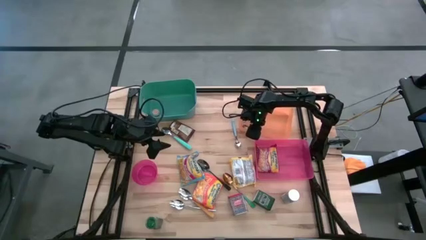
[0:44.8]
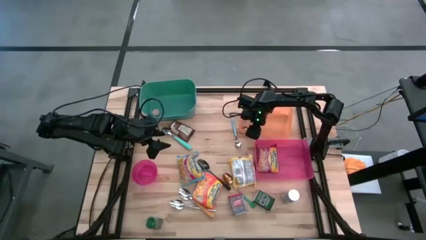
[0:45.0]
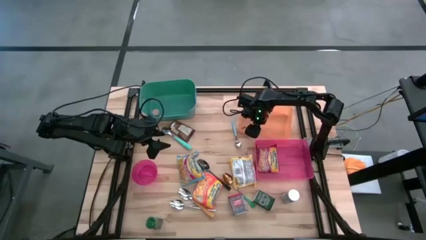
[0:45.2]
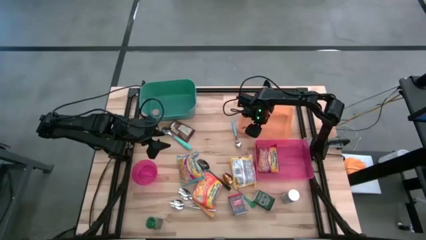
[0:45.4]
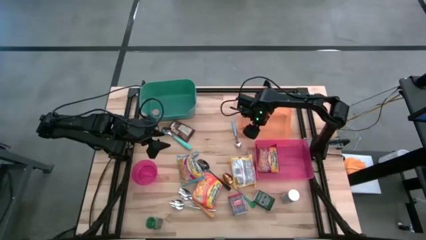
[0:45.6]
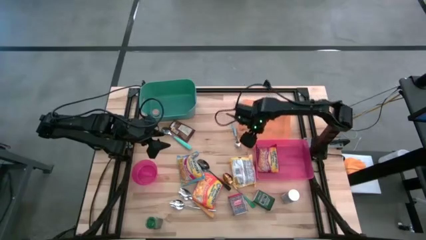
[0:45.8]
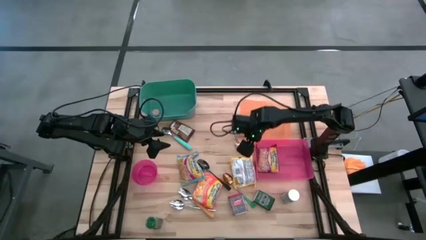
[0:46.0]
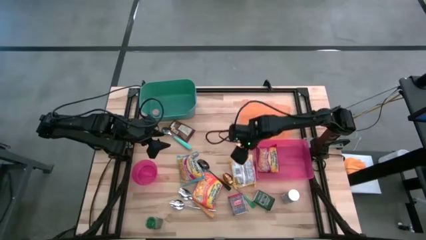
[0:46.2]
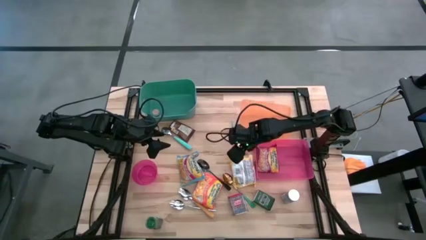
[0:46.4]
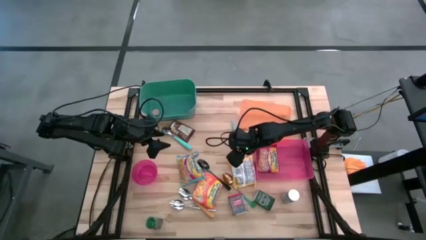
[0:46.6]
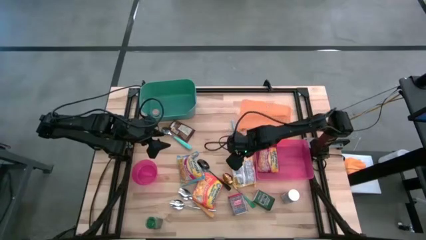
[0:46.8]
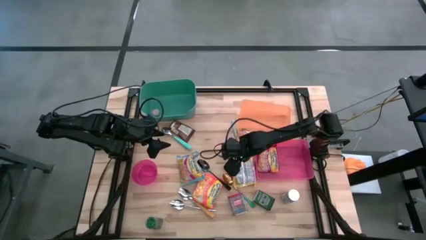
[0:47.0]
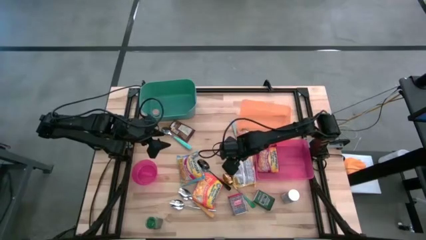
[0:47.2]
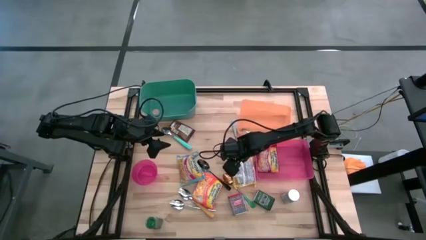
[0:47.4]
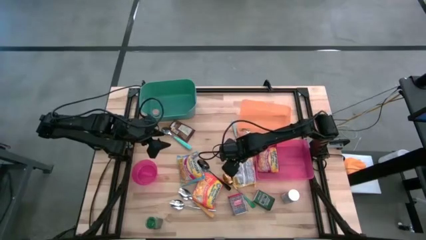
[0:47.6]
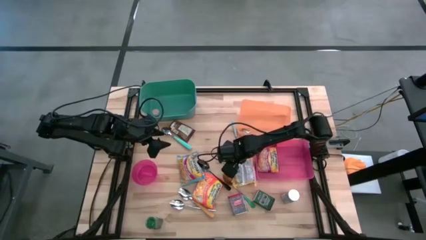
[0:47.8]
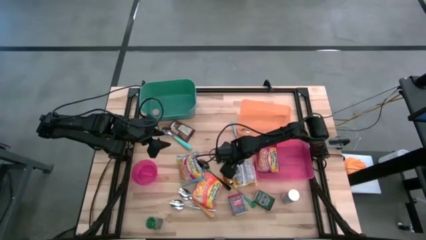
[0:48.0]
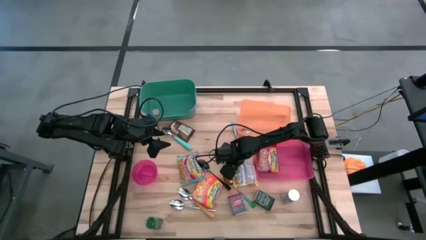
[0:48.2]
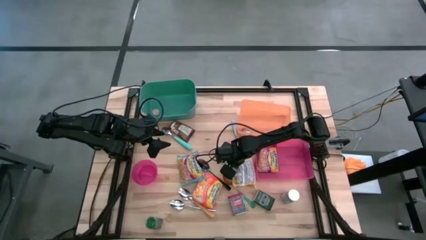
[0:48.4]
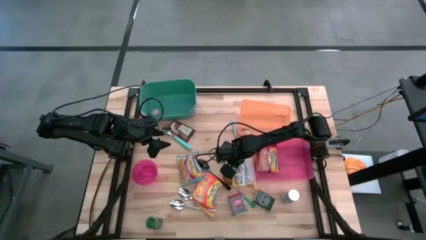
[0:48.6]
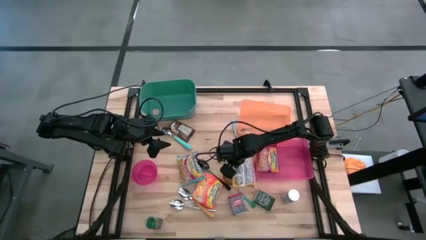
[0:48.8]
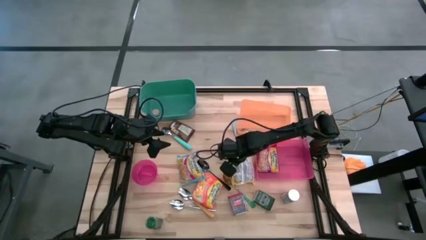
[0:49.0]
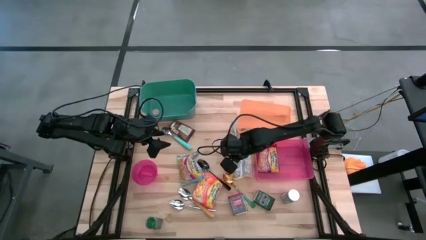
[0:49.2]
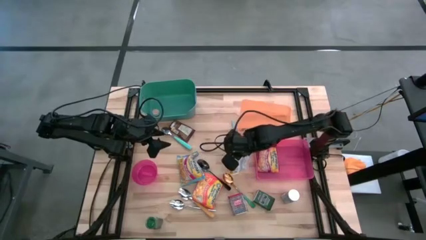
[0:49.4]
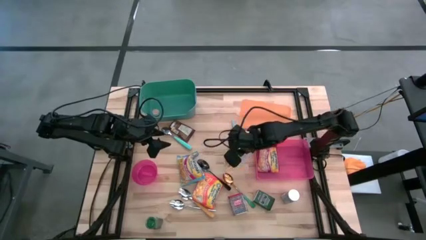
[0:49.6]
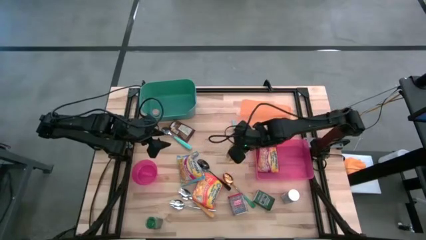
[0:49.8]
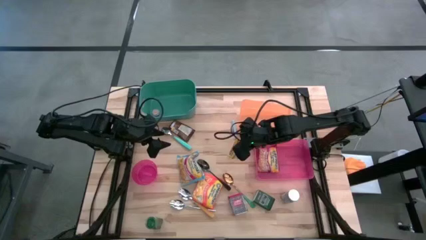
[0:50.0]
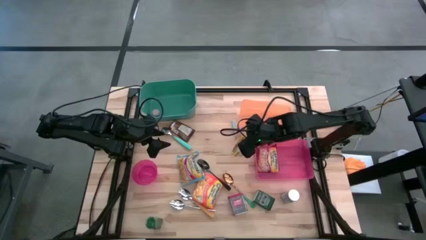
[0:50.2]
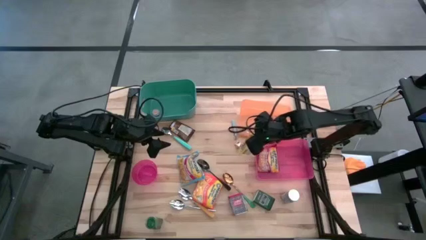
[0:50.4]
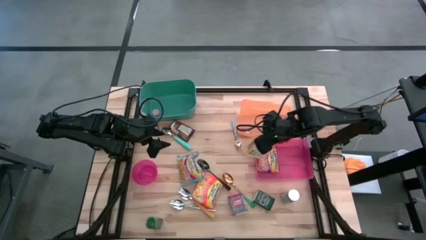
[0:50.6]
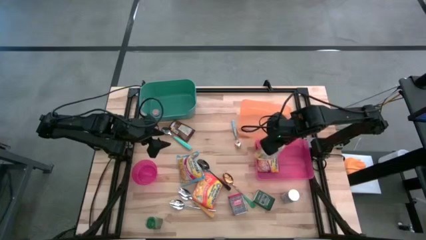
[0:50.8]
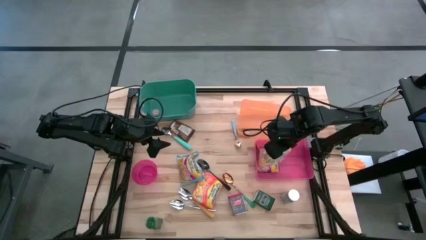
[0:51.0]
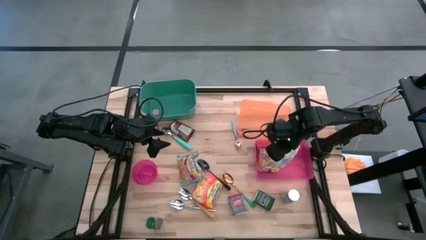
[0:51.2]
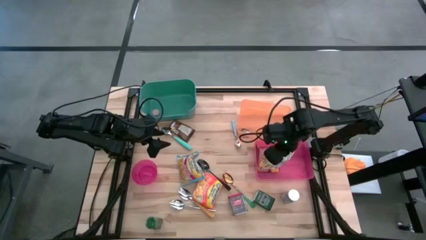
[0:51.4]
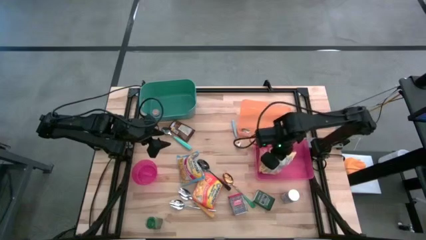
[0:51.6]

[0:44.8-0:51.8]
Put the yellow noodle pack into the pink bin
